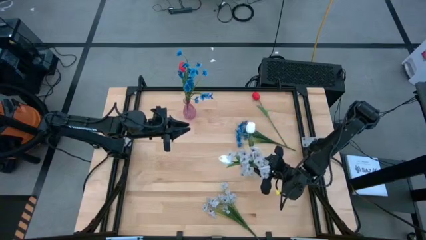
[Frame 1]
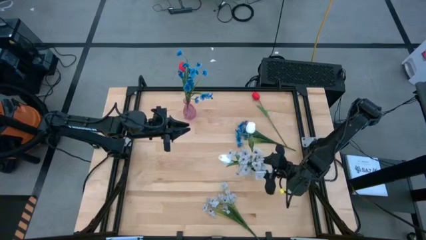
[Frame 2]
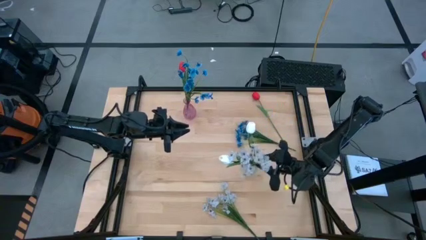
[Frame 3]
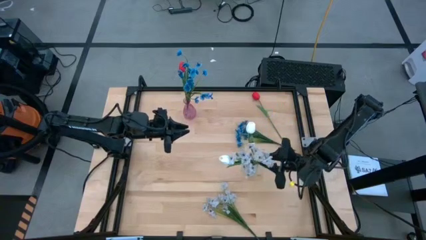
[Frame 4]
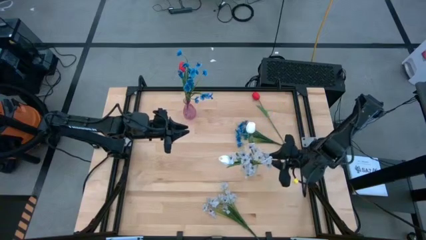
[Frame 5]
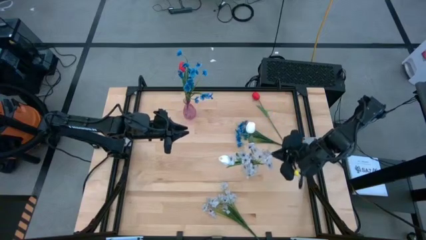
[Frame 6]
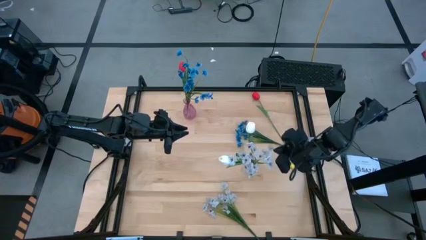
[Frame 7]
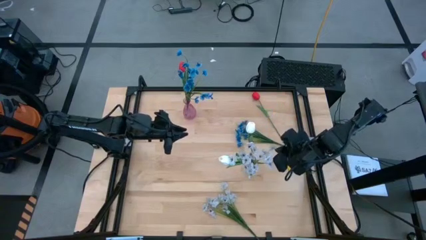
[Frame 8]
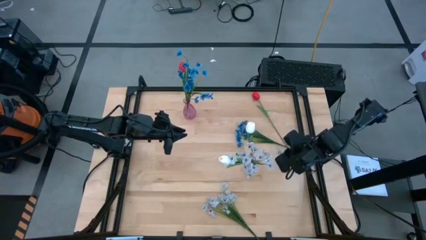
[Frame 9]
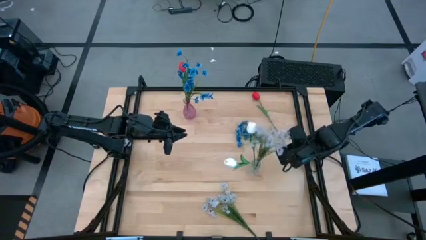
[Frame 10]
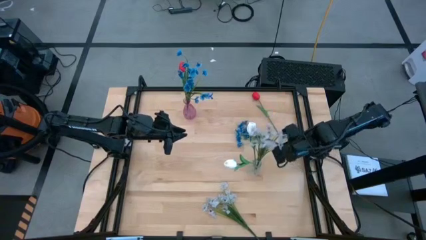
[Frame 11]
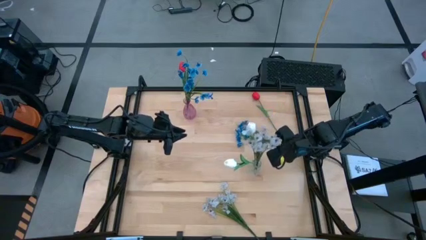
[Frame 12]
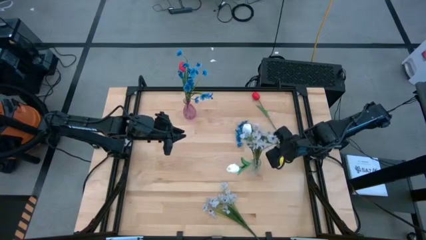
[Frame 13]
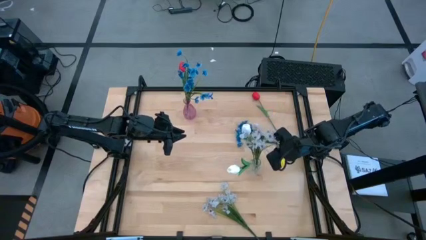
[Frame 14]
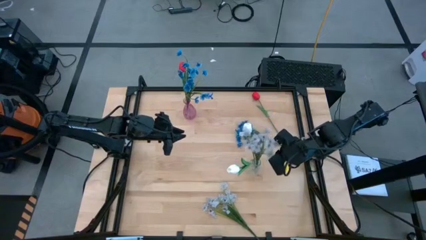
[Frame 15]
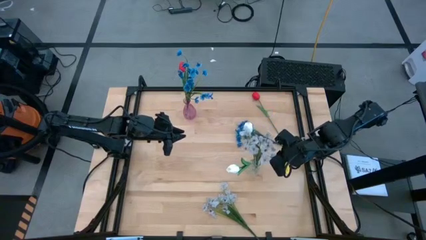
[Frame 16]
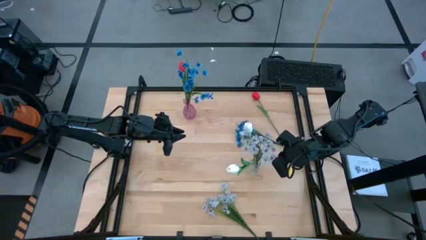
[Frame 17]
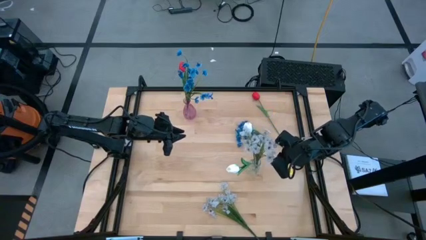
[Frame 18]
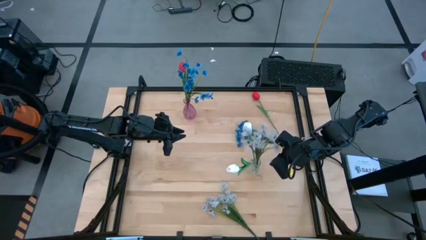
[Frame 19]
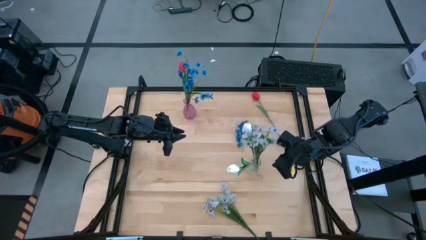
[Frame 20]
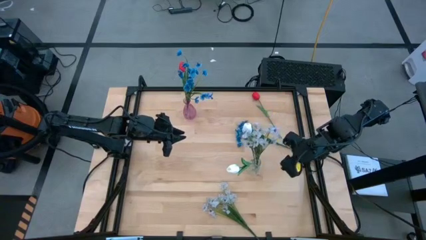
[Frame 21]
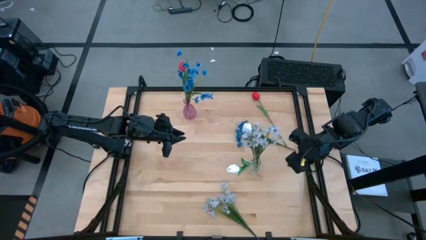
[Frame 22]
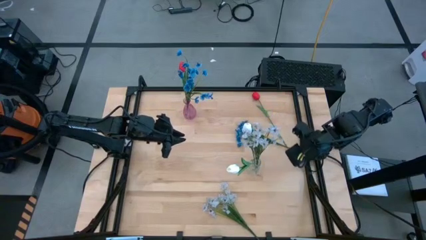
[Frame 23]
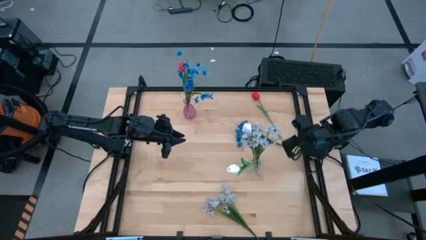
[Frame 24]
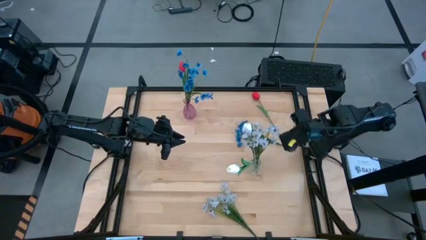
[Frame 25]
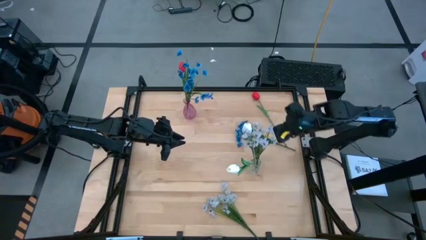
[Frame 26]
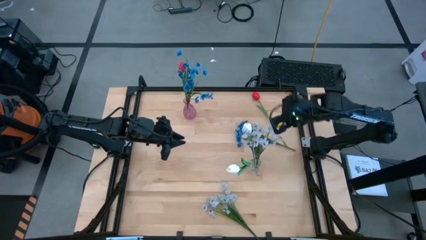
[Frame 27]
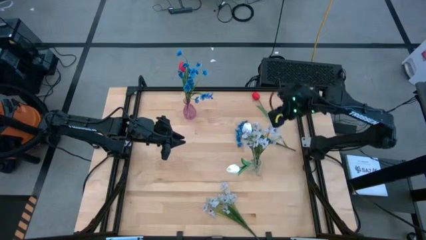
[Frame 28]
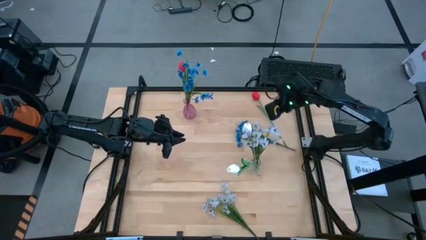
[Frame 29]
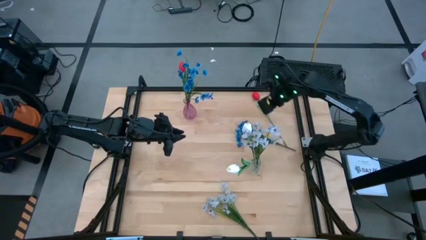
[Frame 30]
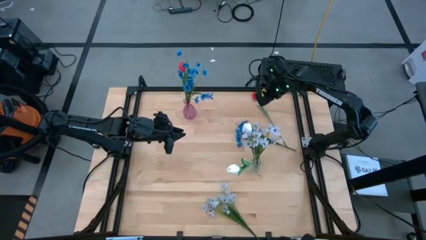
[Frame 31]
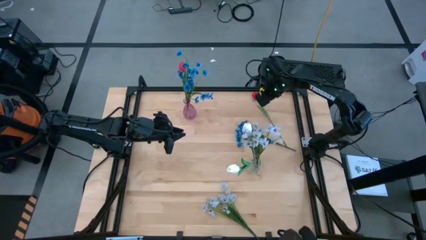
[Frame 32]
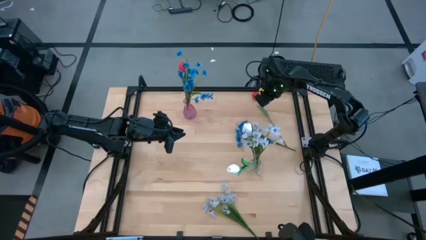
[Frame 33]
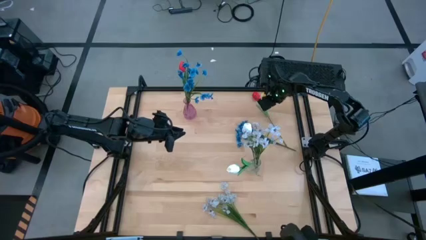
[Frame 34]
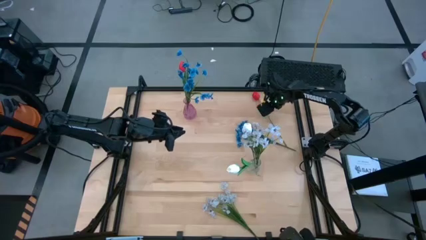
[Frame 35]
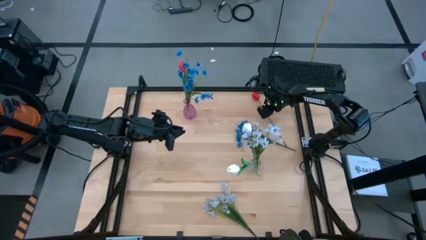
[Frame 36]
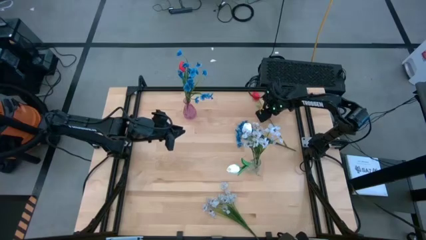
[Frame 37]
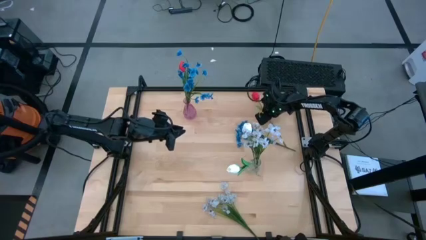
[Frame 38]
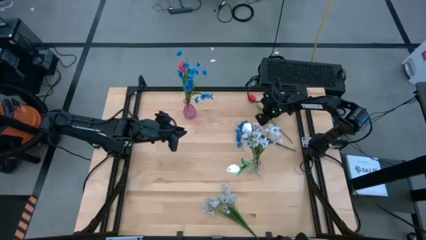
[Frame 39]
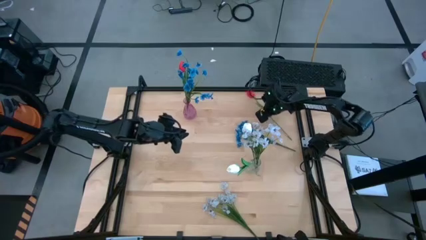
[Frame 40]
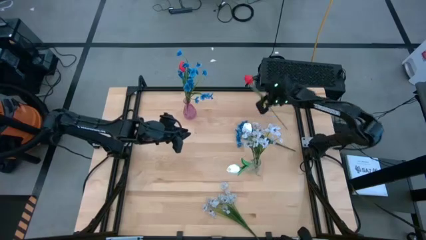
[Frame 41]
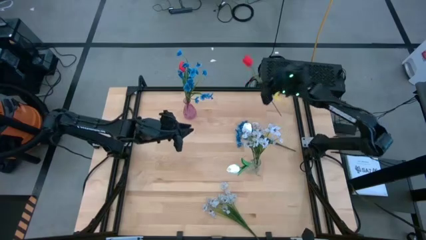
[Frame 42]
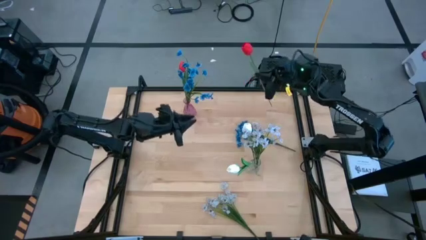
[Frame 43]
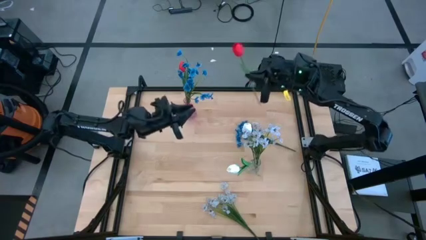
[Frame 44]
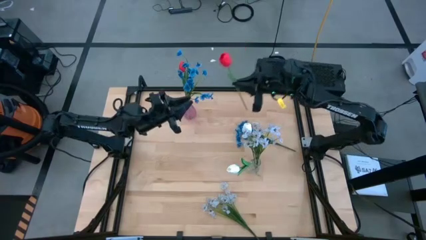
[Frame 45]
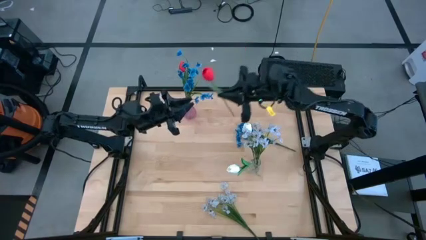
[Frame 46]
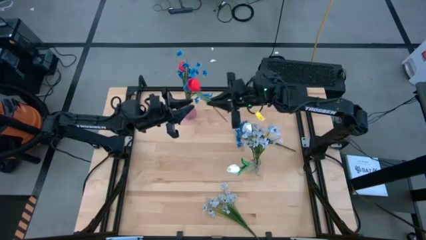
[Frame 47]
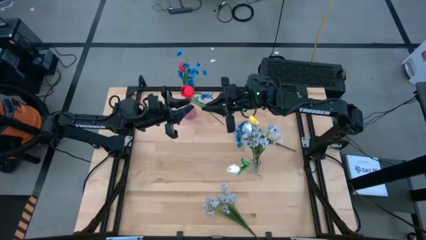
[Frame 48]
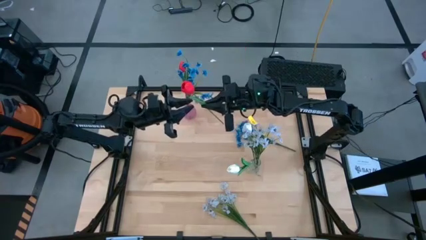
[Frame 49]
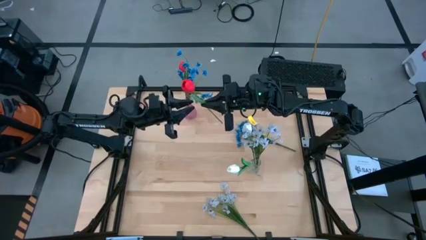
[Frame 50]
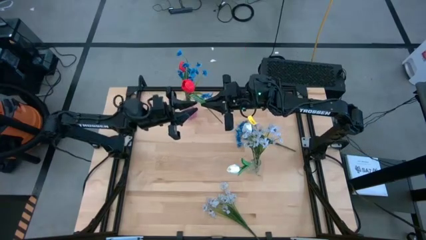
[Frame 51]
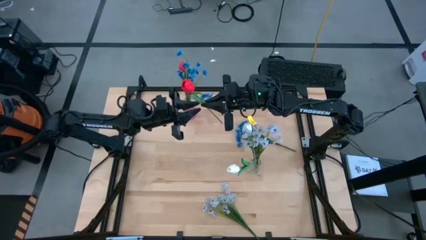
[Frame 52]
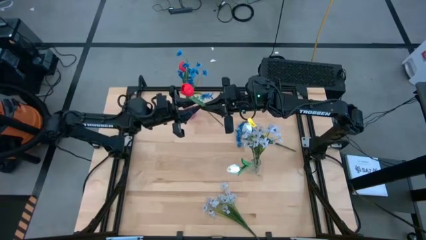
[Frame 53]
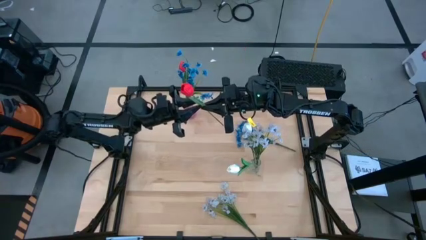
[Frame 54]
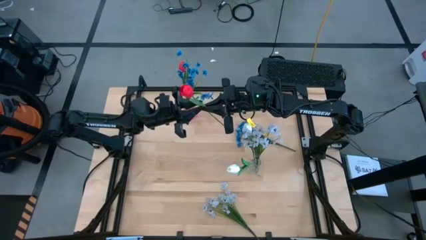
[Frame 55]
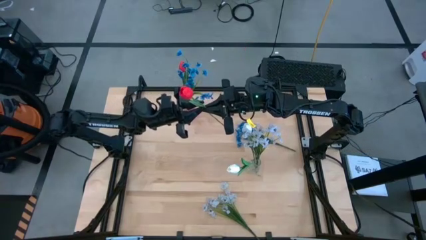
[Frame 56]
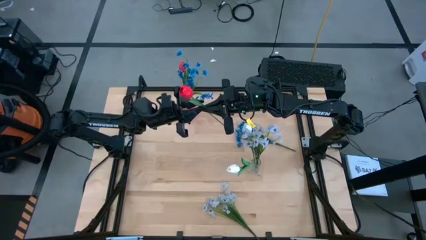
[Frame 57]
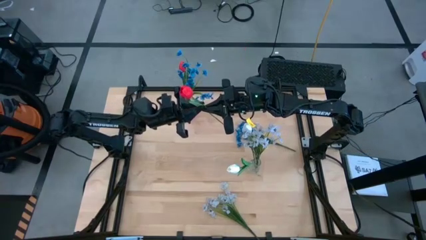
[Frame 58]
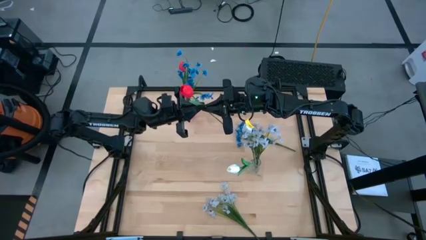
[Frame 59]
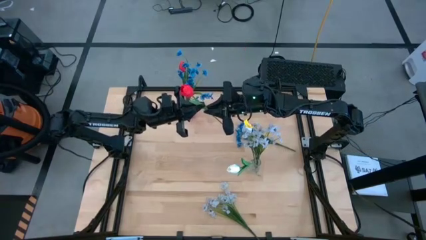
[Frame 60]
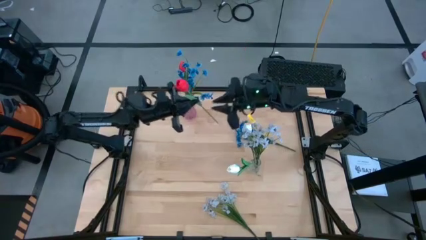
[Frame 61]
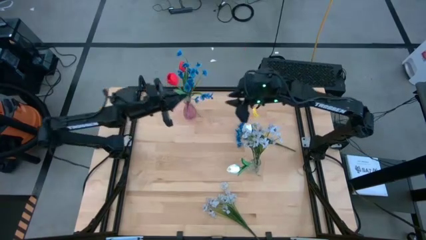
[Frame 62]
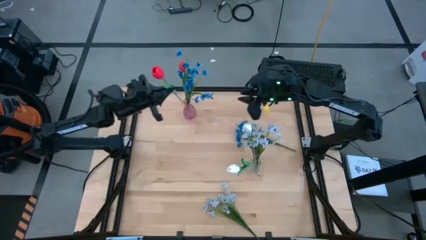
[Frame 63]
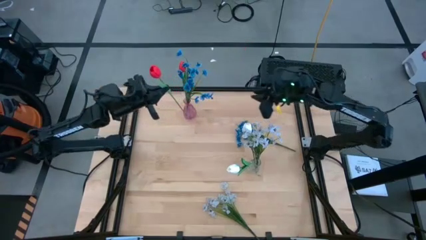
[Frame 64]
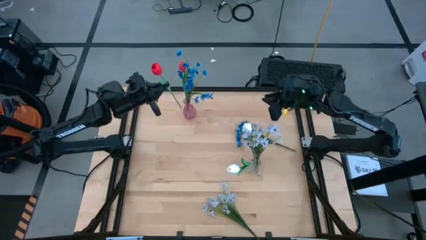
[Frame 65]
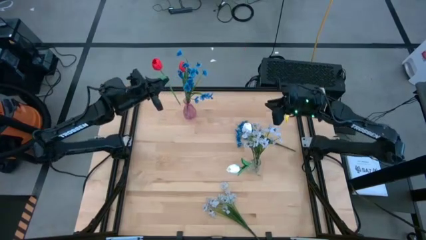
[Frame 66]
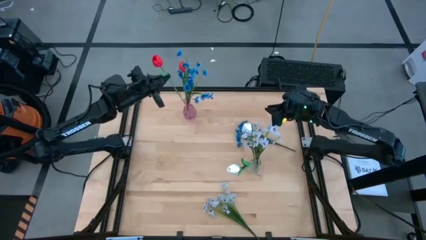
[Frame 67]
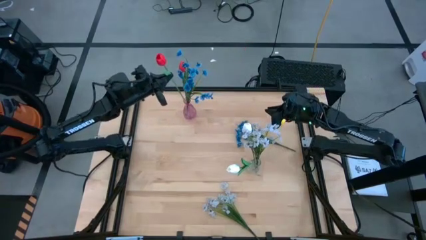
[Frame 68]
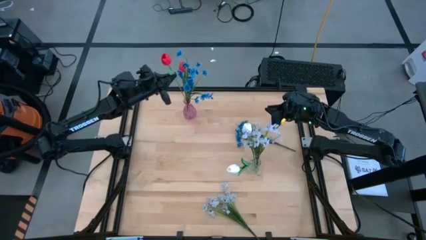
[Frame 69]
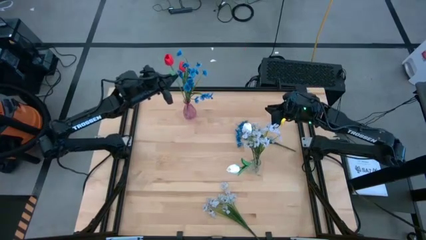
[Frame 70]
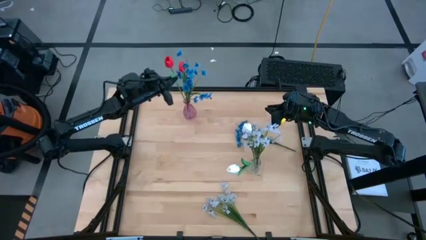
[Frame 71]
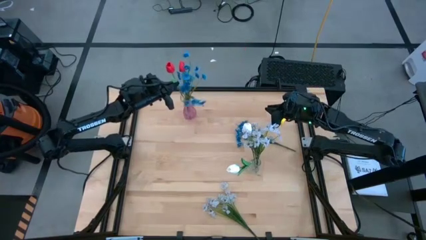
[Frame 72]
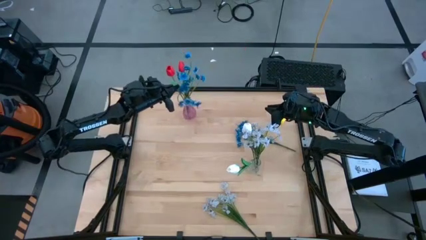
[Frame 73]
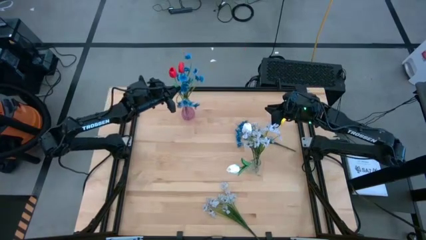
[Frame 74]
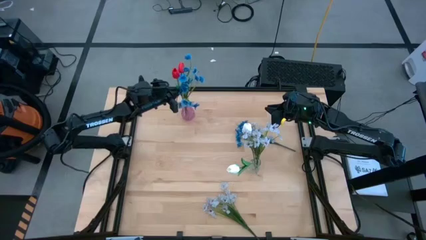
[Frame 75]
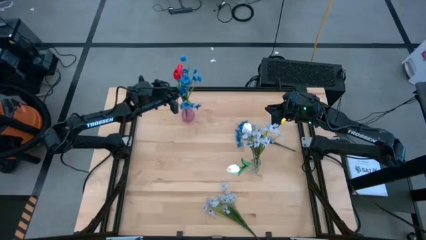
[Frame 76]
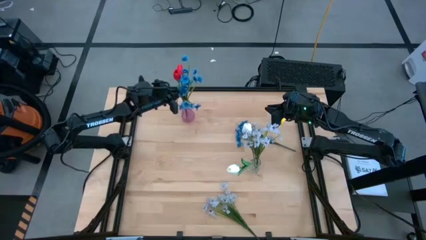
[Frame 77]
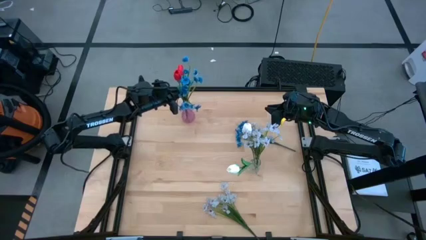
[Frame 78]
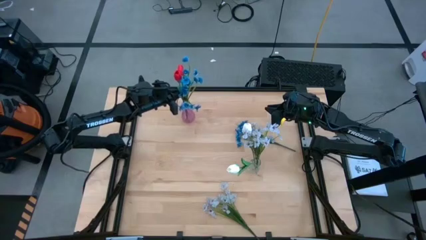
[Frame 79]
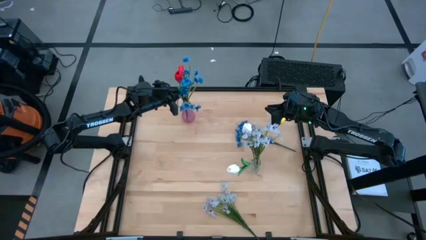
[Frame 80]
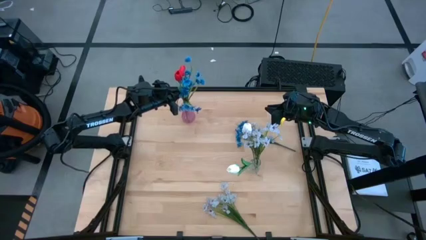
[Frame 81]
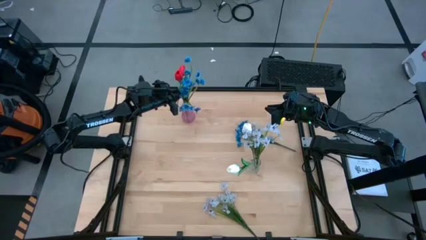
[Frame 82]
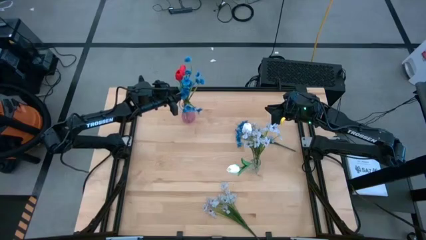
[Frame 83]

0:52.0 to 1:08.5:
Task: Sort flowers into vase by color
Put the red flower into the pink vase
